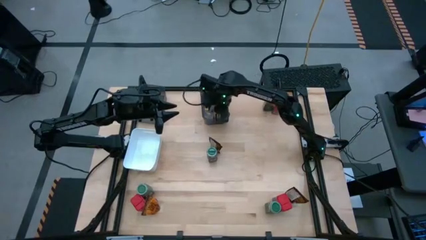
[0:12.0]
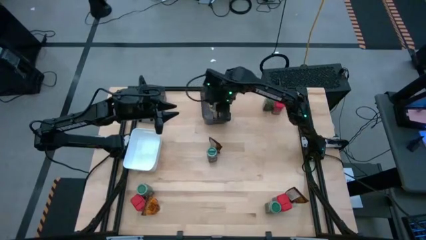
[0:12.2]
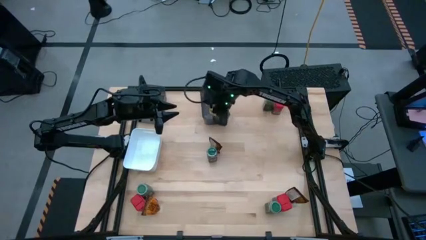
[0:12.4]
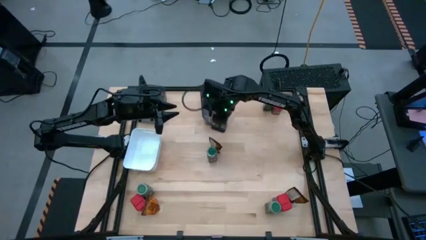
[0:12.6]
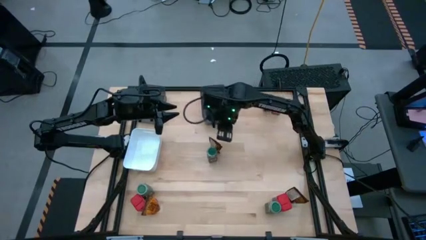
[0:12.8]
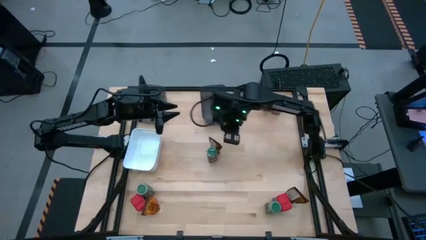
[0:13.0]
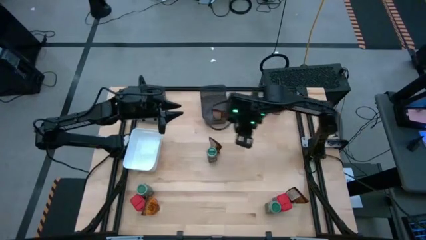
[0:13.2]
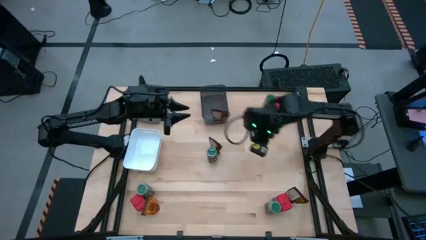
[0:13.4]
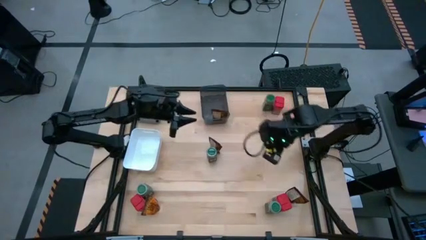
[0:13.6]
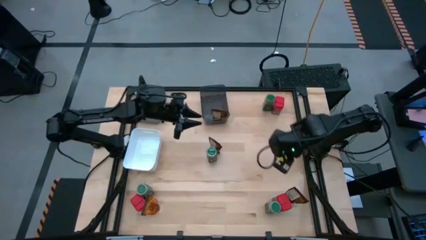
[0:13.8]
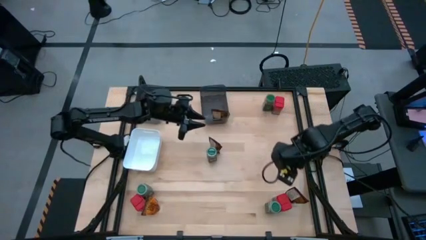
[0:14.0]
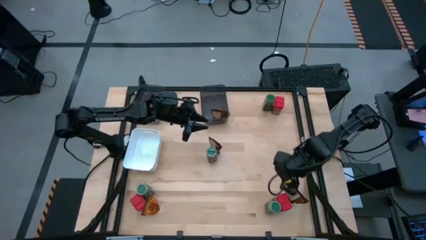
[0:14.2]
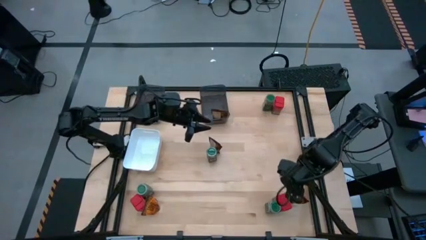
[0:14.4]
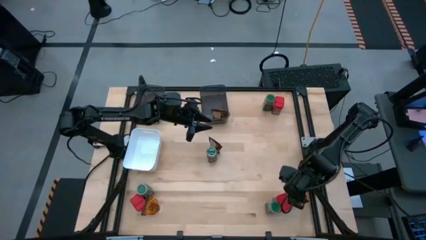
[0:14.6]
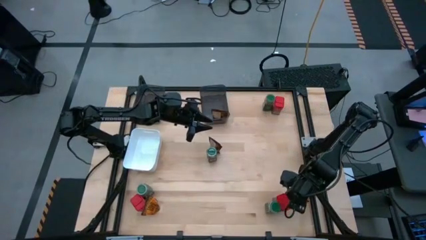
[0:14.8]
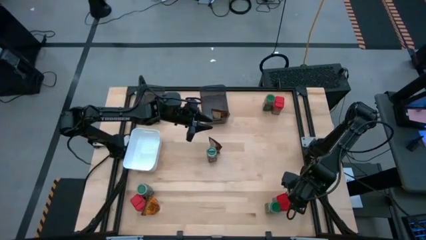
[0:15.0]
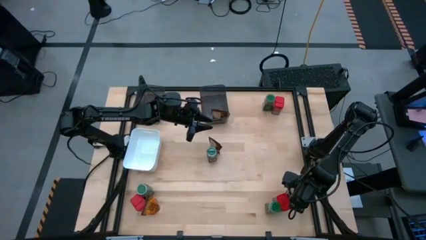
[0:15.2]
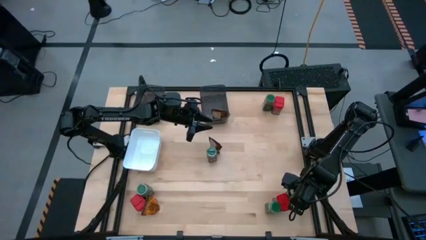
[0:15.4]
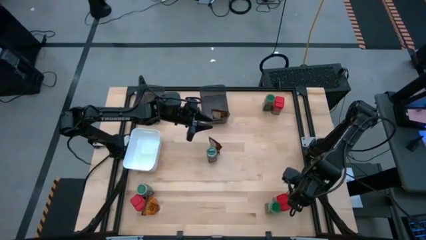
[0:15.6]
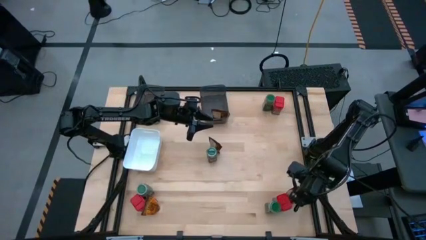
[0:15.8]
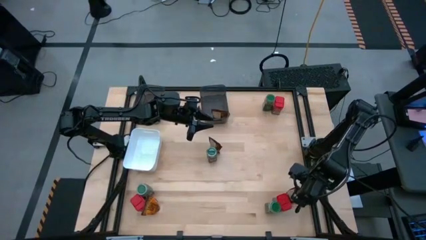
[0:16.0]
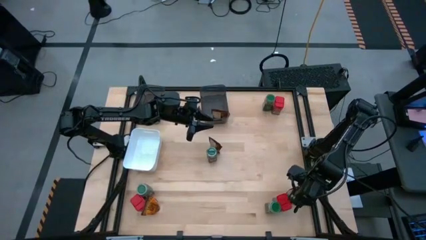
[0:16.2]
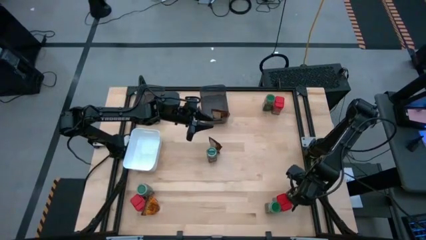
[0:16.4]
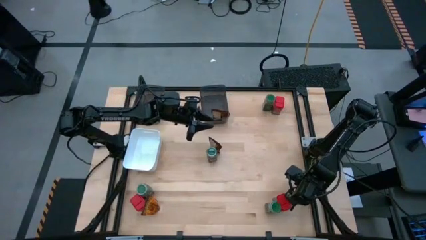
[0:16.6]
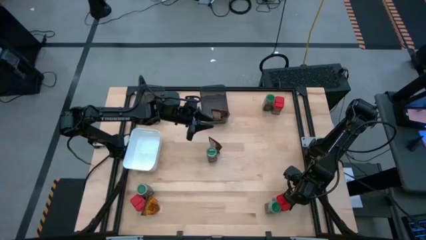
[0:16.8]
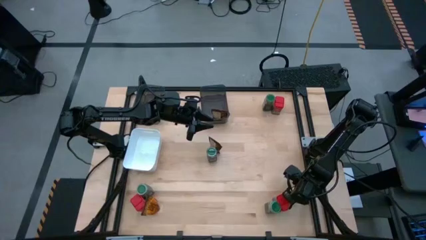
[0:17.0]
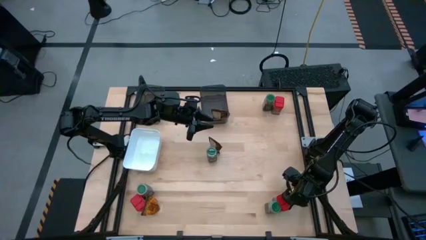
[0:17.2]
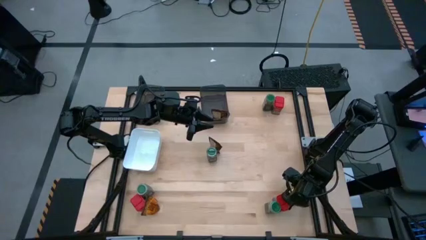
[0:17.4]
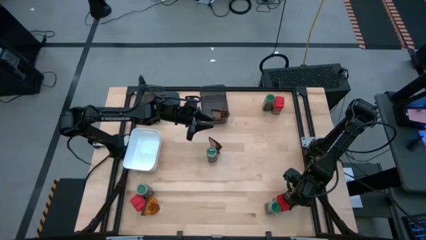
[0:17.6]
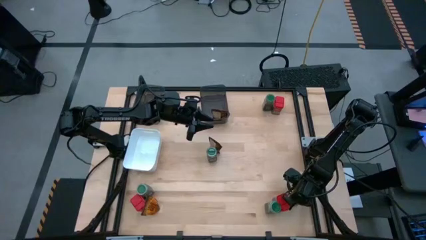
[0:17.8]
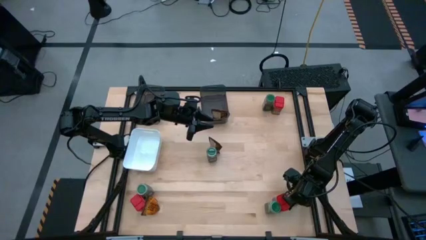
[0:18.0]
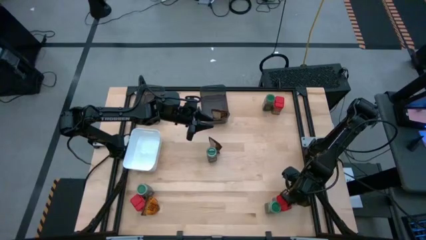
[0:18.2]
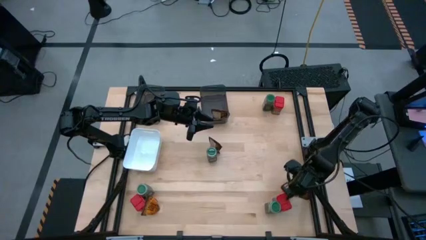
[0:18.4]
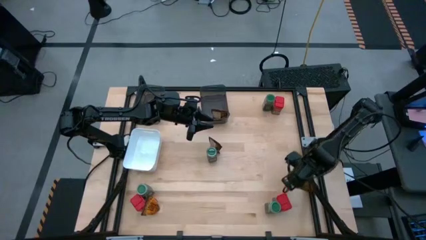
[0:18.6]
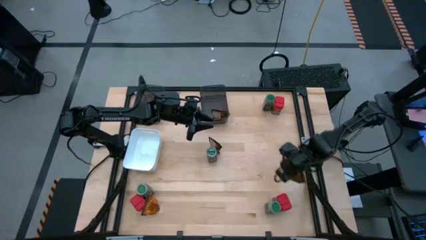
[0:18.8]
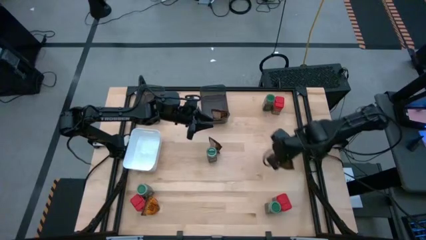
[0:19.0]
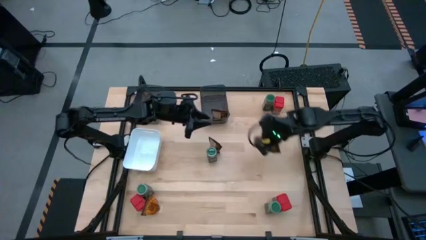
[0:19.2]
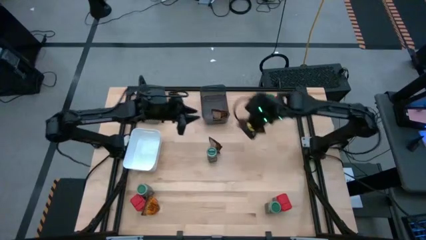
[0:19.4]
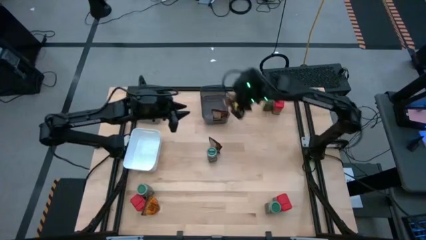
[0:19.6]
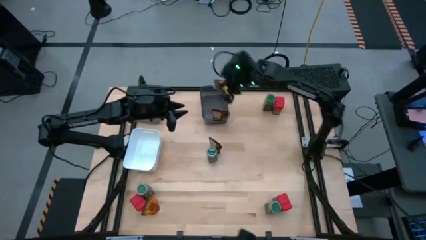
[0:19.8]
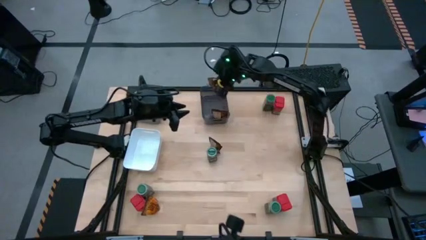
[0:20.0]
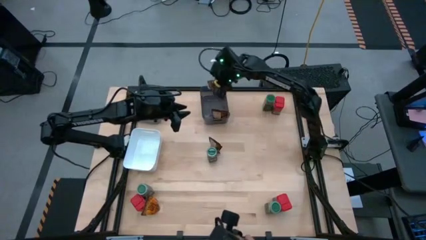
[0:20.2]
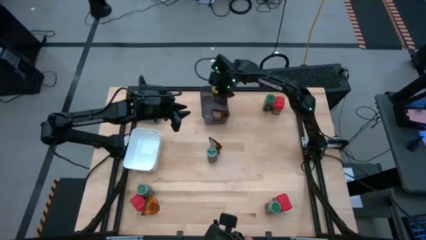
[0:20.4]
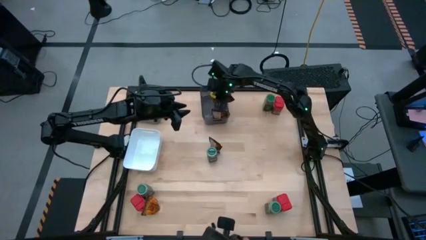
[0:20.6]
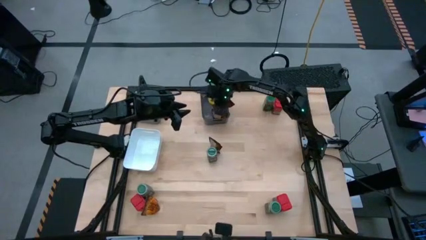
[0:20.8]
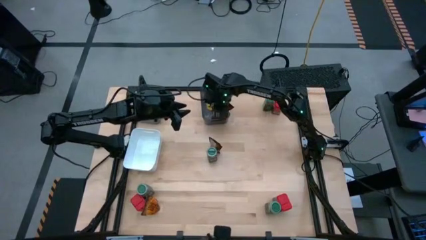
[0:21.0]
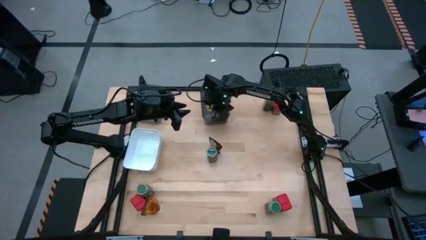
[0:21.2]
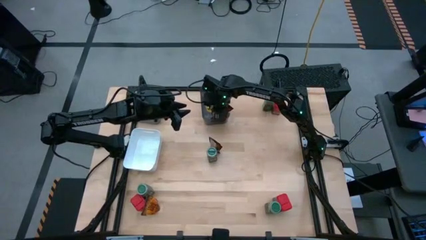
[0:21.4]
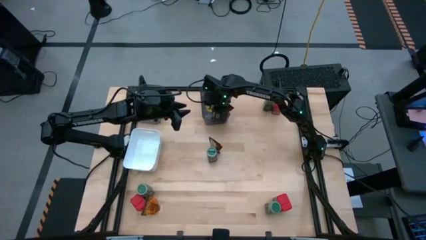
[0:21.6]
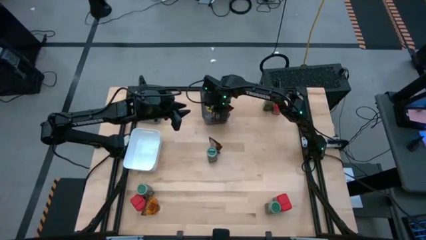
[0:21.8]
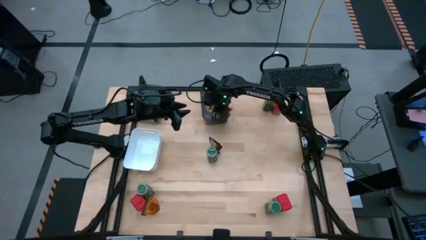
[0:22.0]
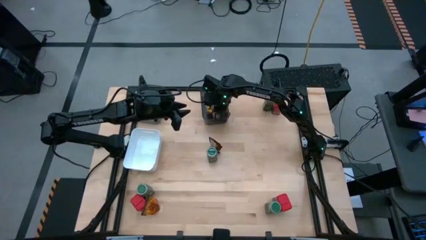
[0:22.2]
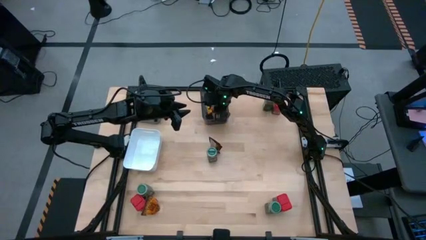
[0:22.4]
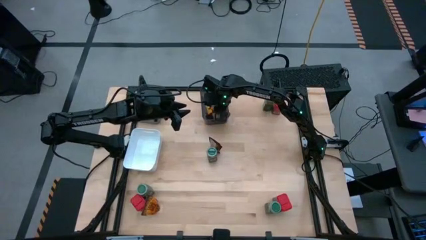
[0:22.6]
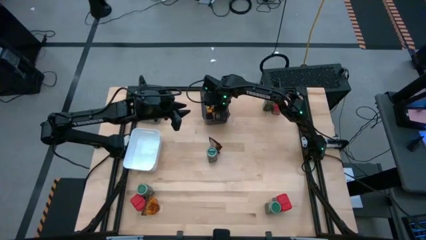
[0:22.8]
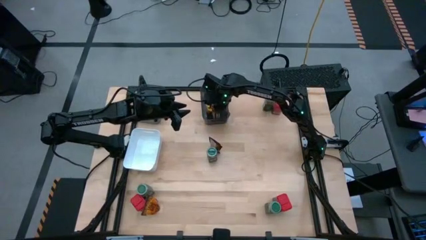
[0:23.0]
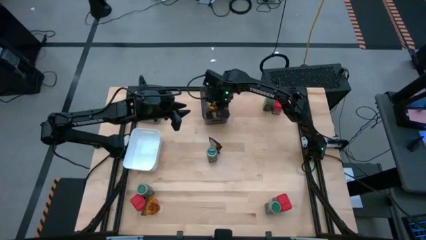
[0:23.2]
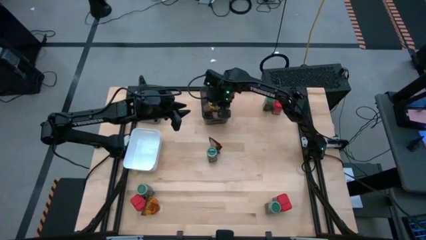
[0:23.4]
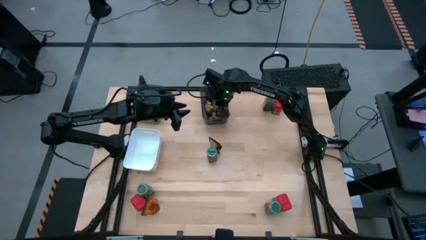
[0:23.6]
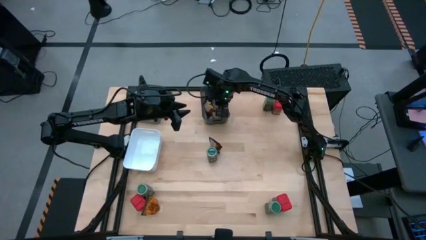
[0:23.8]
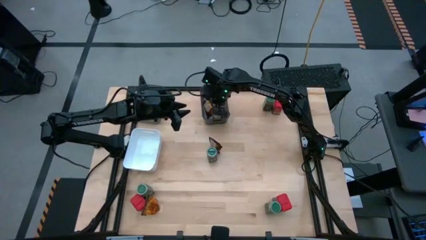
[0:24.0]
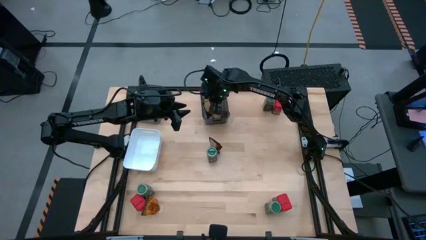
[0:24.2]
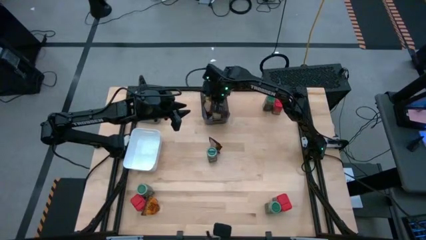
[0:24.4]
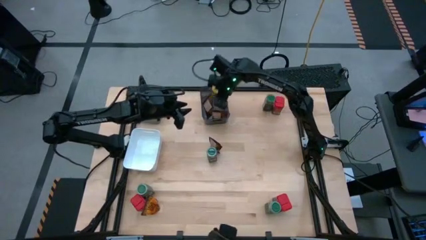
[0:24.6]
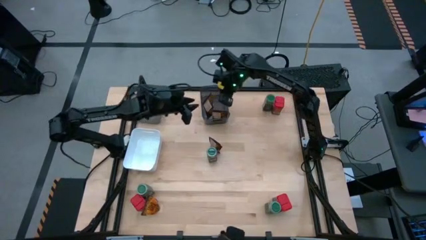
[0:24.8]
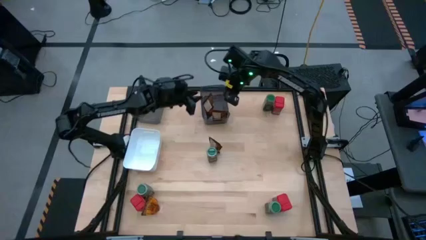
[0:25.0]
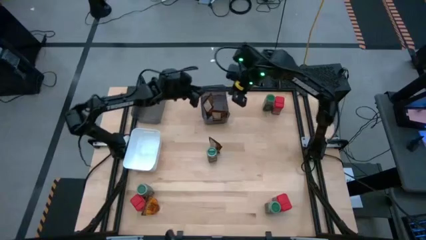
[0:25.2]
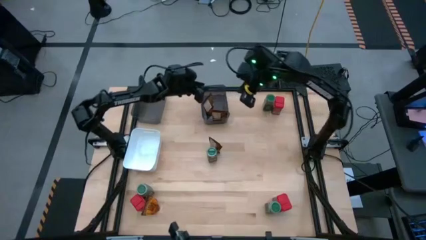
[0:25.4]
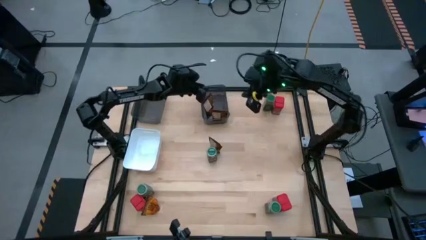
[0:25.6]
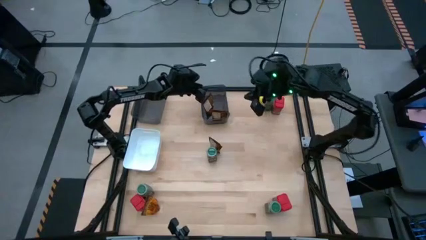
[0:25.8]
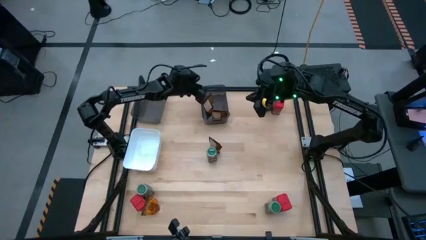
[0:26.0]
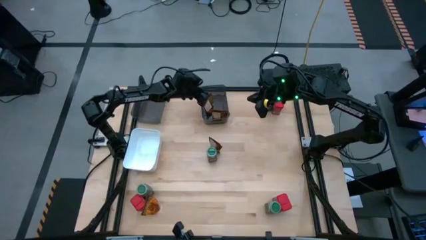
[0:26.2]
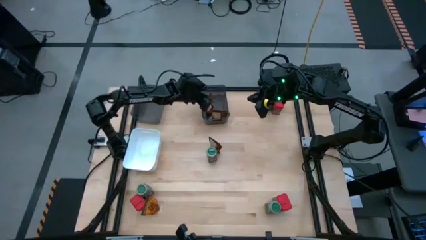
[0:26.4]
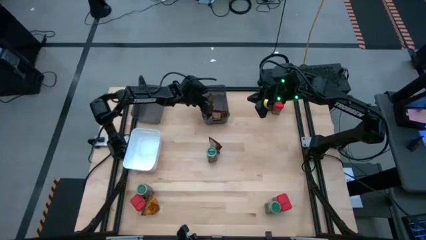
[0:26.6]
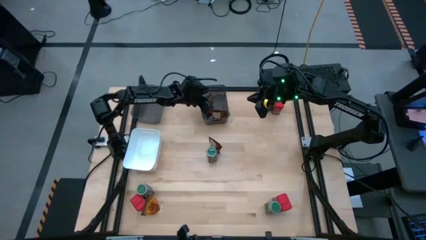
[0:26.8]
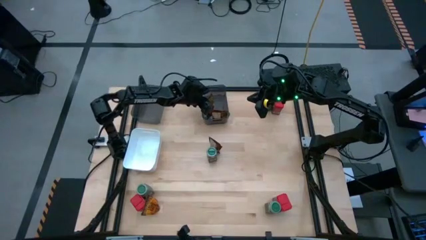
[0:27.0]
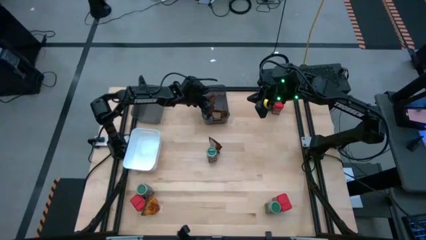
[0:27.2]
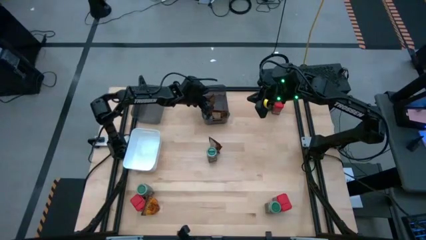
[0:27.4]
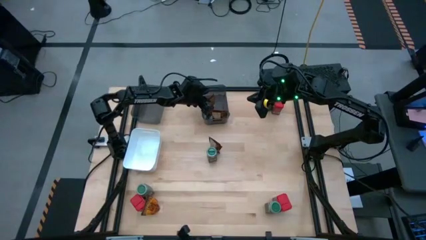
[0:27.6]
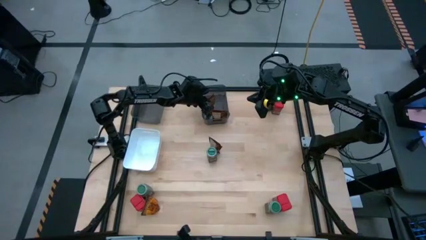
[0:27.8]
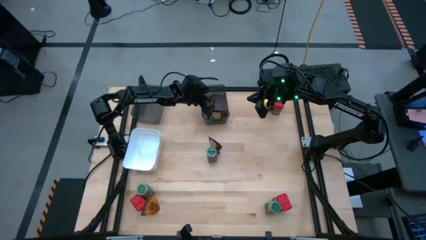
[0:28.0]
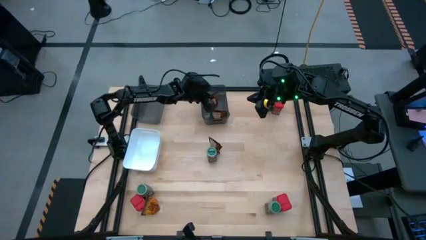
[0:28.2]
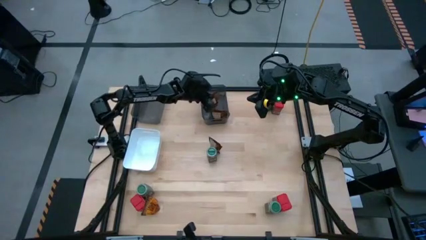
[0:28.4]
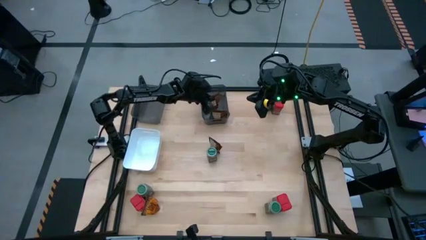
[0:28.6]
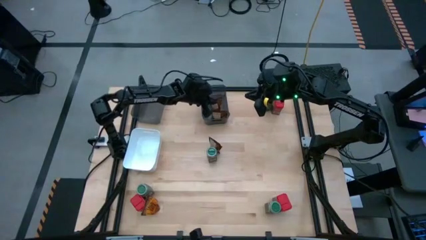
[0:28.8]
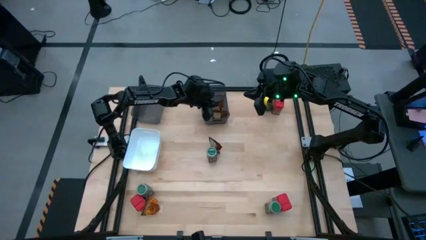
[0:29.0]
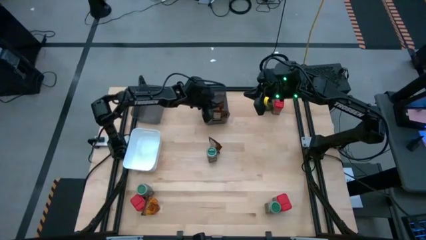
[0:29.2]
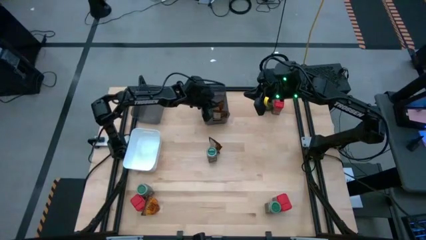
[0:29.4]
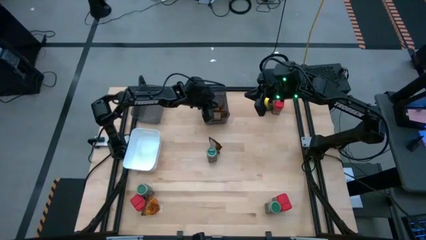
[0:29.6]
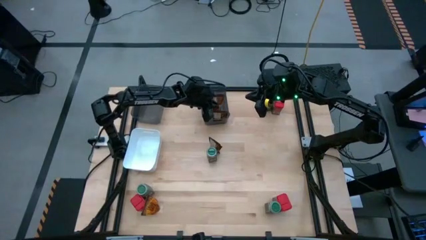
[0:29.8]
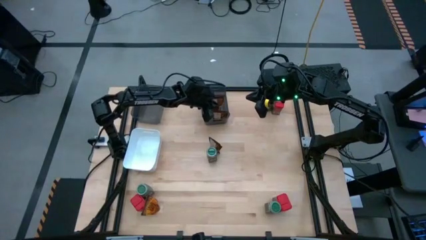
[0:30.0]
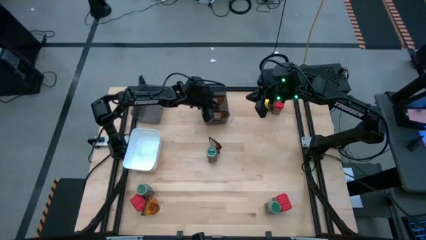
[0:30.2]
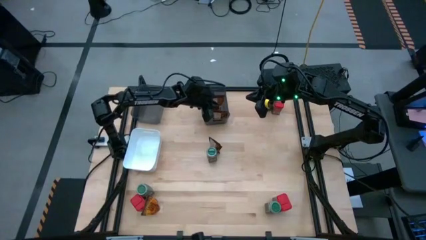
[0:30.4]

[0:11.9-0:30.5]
Task: Sort spices by type
Put the bottom right brown seasoning bag into the middle black bin
